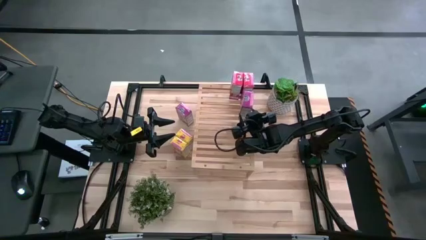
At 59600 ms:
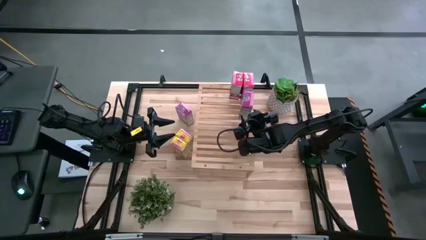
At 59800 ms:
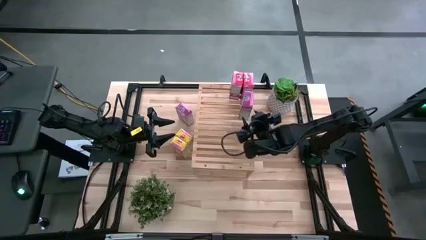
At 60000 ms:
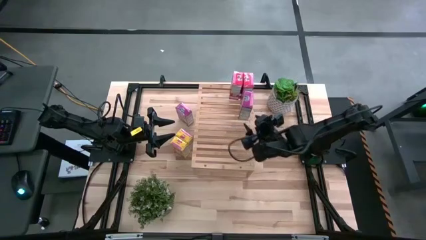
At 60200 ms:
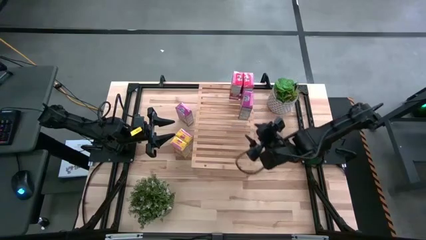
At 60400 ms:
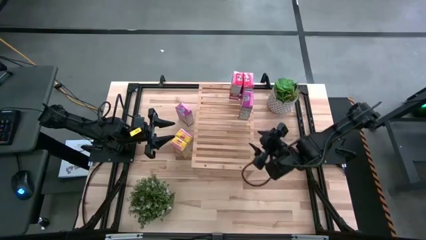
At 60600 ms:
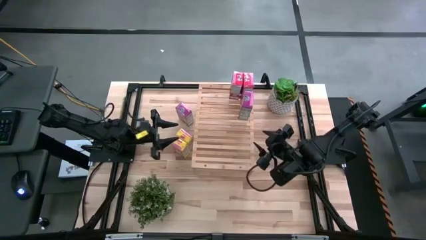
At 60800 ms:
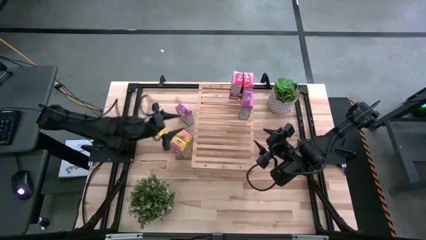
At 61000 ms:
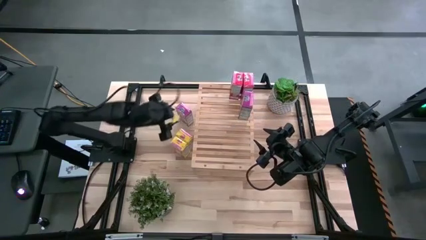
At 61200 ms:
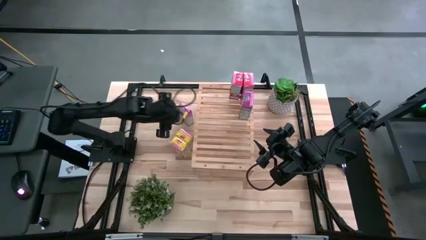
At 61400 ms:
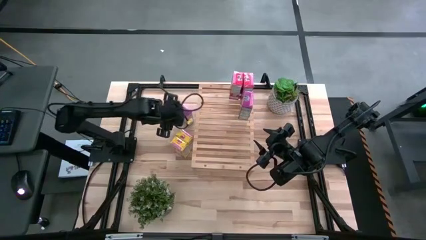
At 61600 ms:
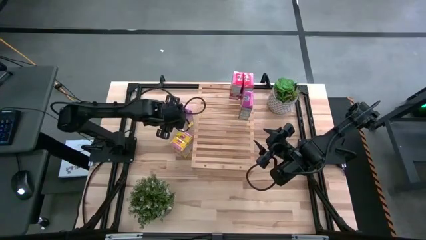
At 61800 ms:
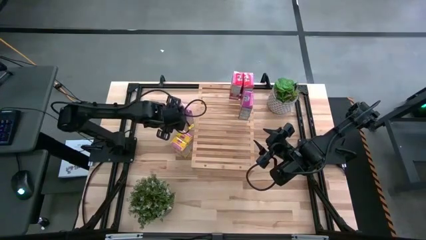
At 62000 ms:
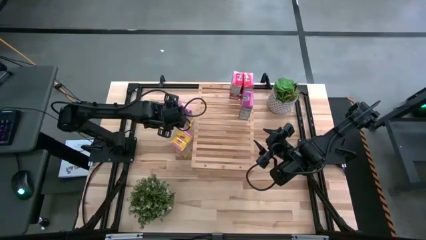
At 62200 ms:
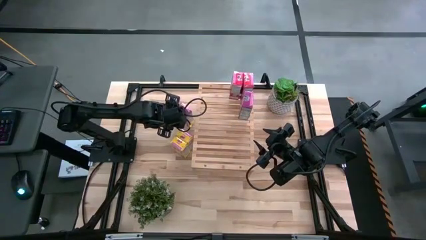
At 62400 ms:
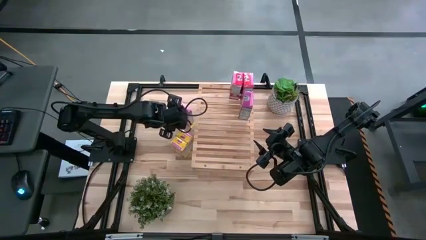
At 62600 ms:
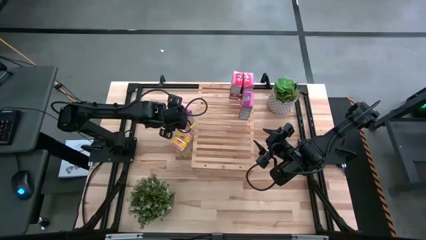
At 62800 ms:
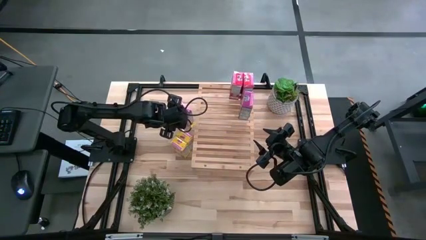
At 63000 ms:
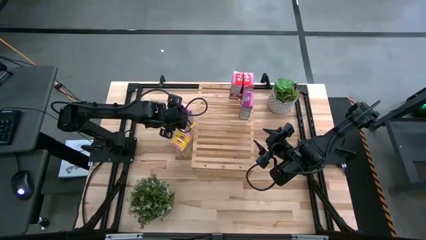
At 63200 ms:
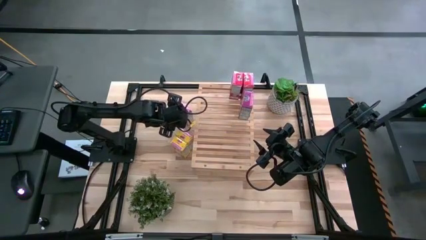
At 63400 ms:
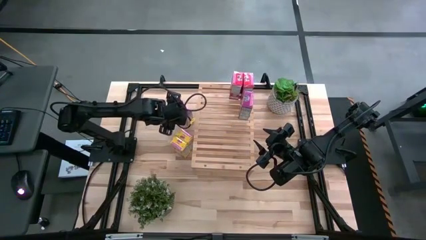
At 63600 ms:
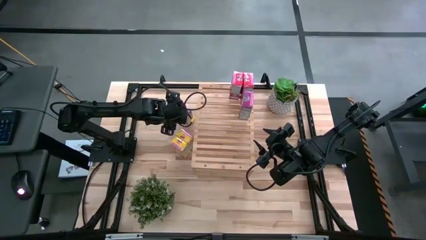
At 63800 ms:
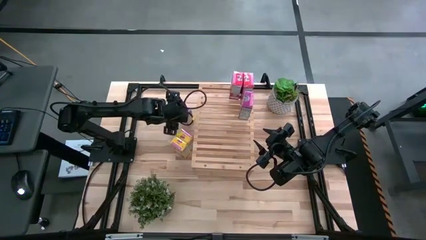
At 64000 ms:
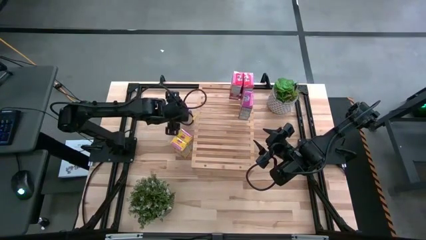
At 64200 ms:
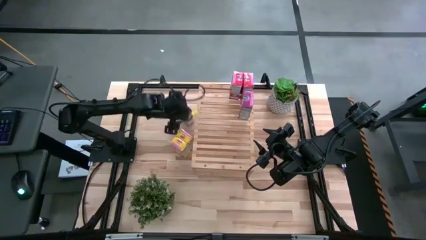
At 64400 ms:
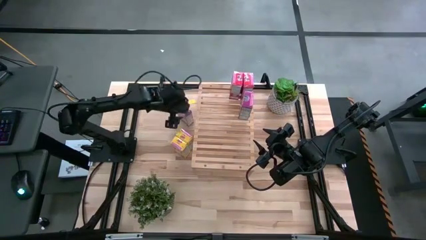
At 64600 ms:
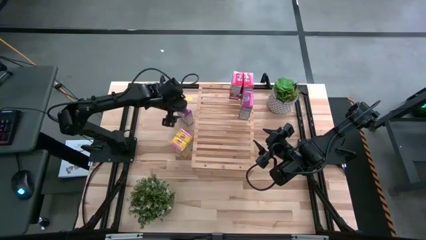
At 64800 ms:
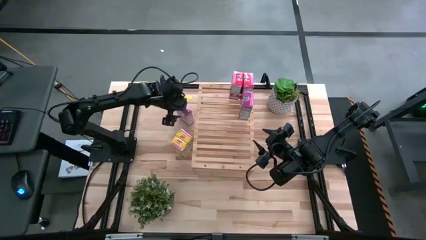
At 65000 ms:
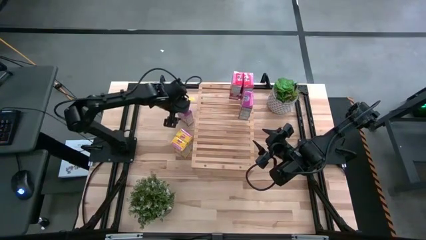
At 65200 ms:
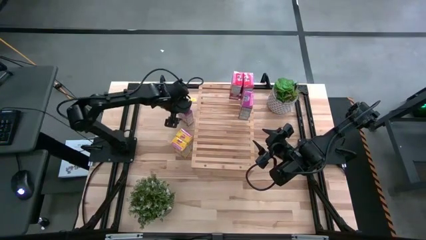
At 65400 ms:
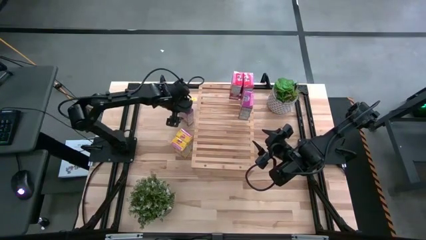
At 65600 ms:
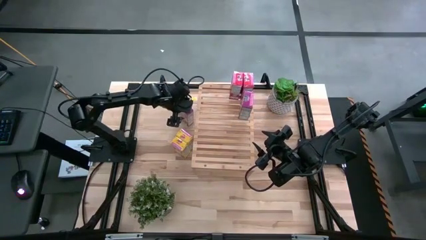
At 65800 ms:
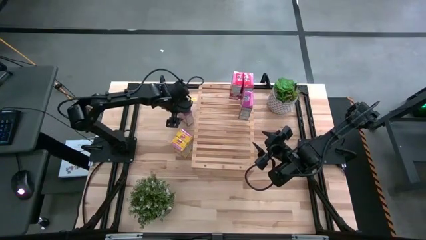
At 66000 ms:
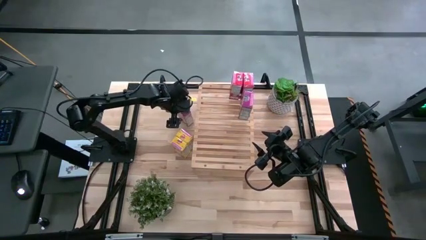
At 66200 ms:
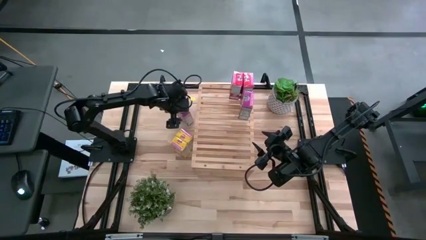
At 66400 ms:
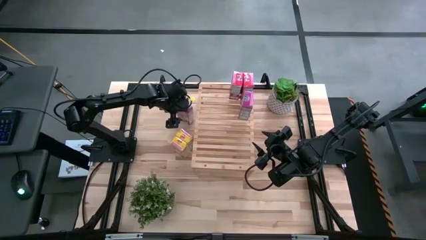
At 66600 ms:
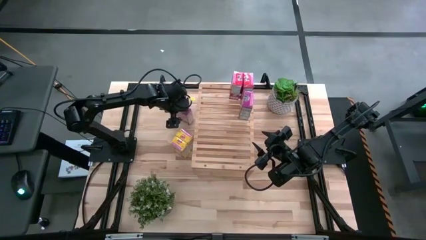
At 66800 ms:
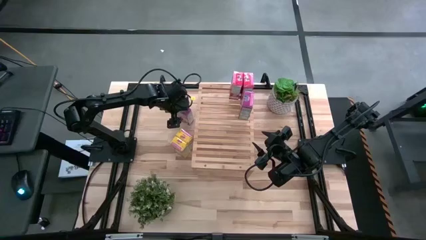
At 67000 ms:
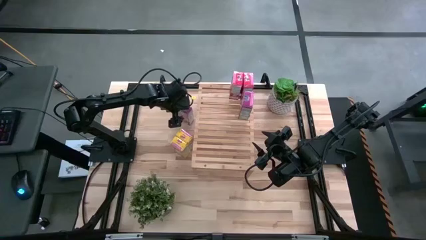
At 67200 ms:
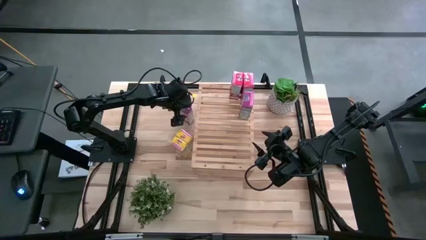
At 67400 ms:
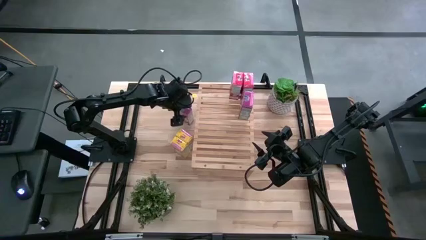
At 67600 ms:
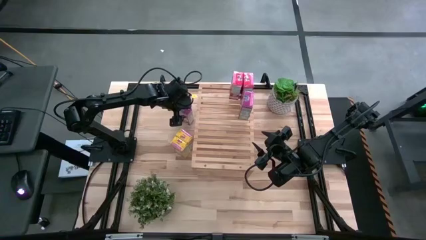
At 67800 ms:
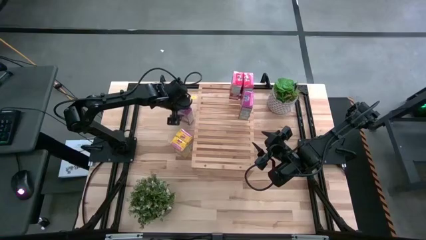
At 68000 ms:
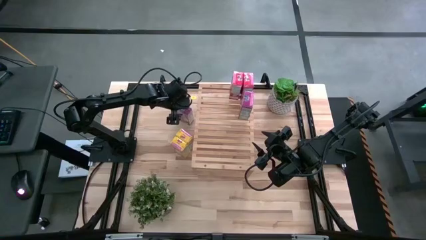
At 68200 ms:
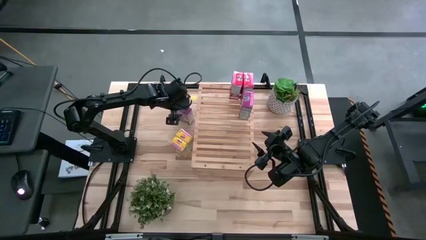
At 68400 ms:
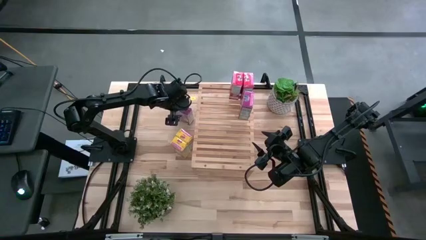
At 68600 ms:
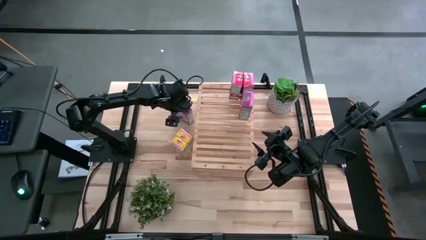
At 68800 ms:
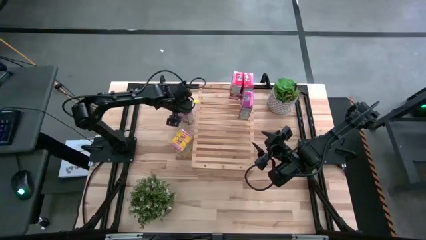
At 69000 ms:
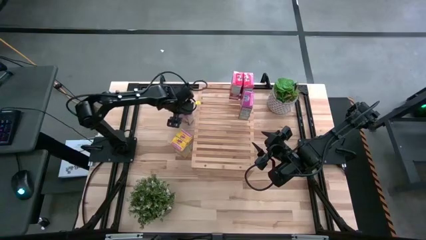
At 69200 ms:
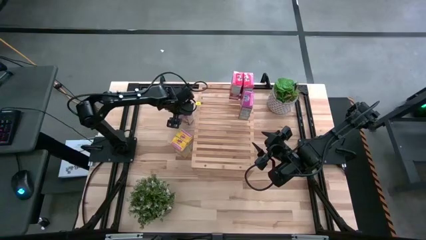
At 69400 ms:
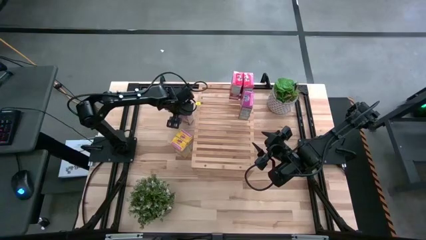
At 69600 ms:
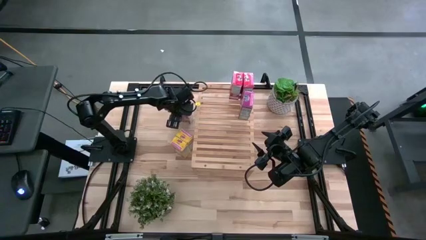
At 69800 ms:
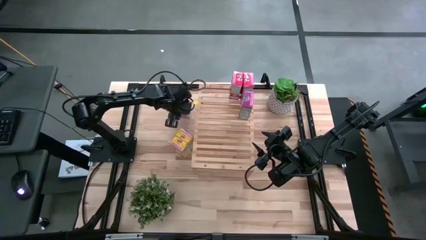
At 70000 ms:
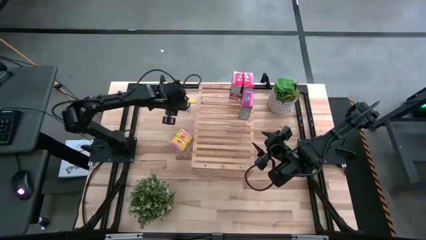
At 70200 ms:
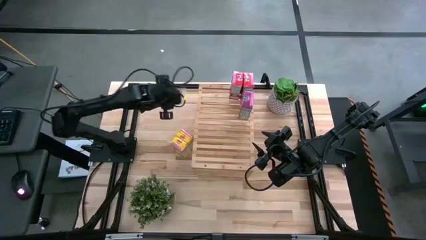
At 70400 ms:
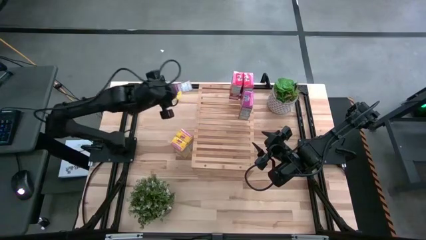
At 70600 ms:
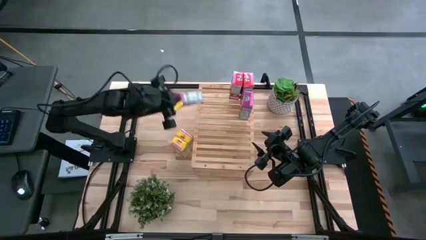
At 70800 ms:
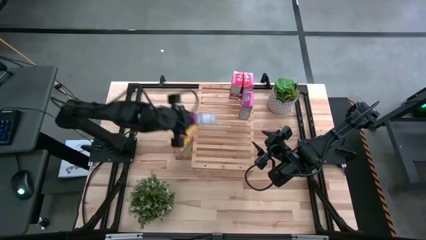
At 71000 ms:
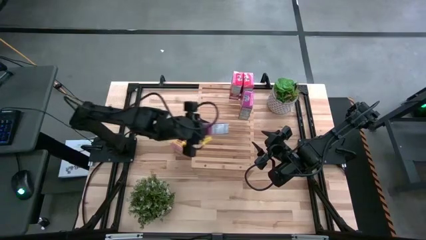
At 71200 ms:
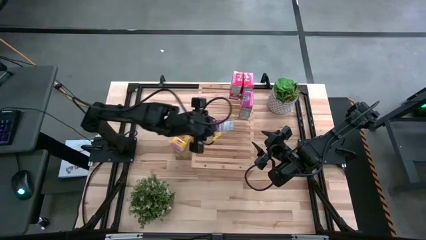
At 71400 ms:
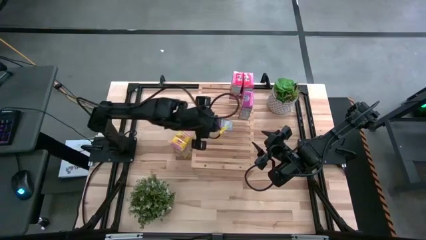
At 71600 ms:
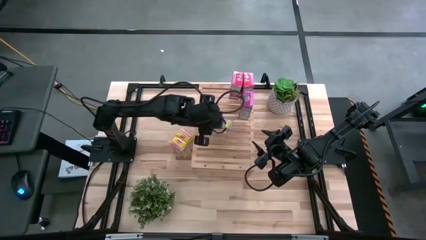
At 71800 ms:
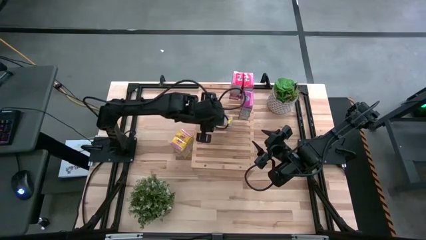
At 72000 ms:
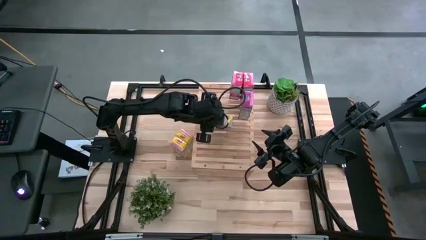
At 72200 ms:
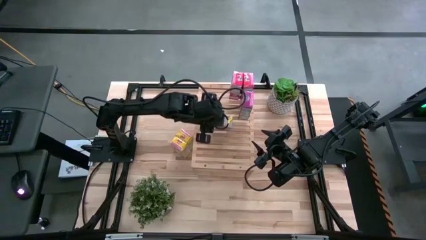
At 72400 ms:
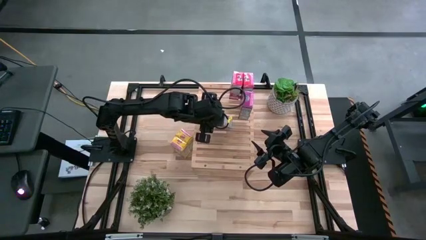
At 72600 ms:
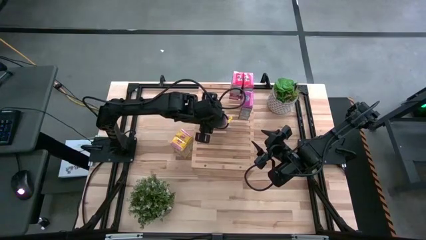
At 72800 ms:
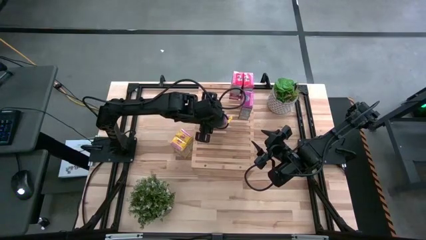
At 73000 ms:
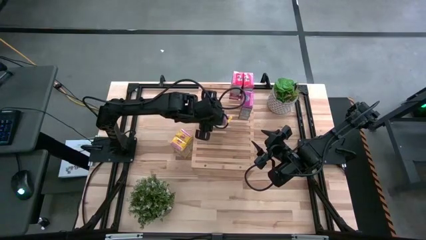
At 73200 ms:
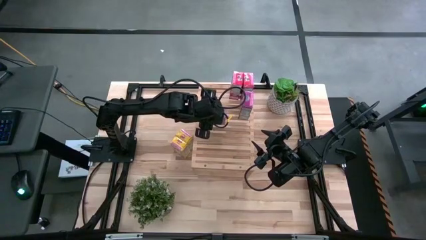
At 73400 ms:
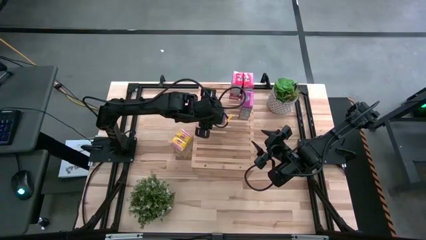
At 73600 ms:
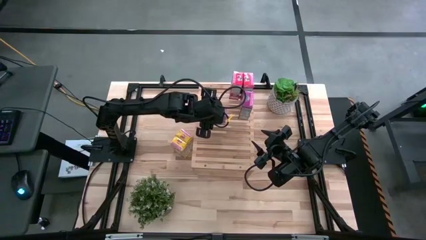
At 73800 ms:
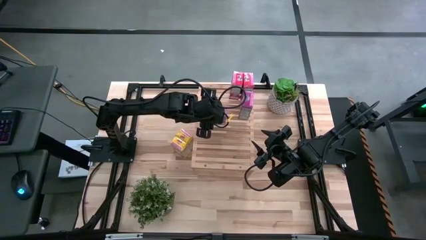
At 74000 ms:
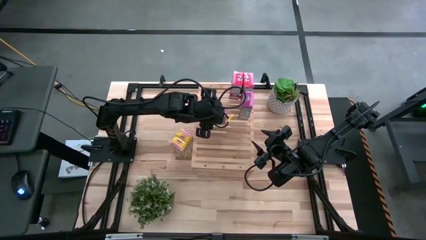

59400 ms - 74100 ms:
Task: Stack cereal on shelf
Put the purple cereal box on the shelf aligned with the other purple cereal box

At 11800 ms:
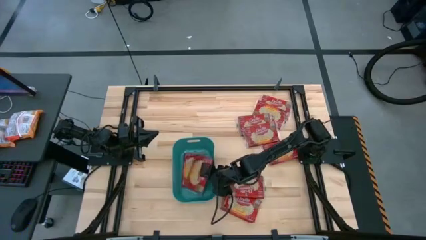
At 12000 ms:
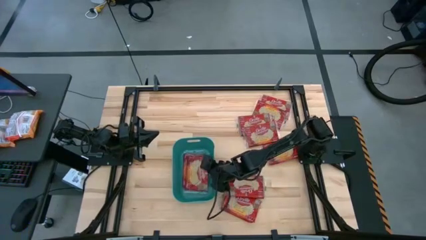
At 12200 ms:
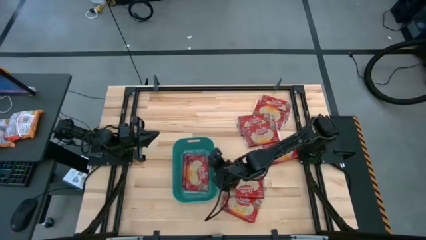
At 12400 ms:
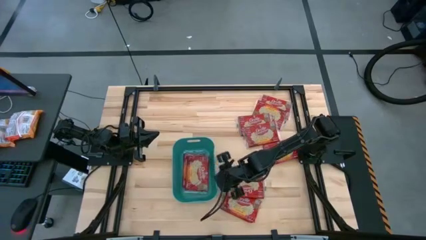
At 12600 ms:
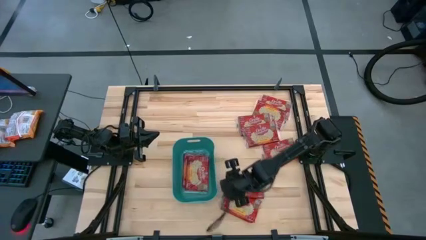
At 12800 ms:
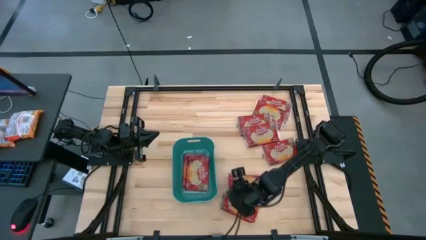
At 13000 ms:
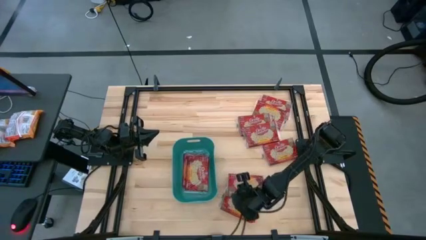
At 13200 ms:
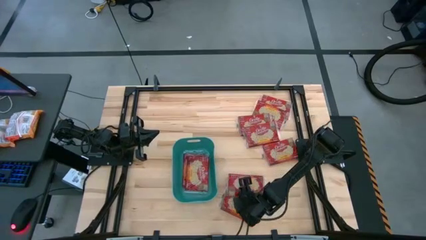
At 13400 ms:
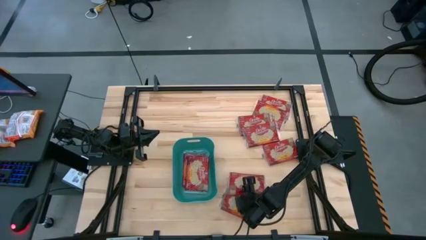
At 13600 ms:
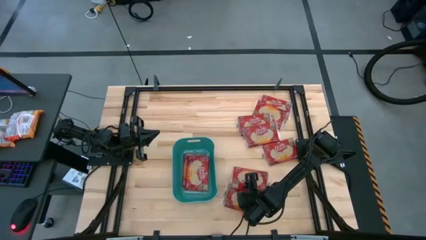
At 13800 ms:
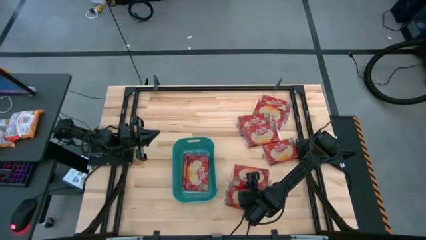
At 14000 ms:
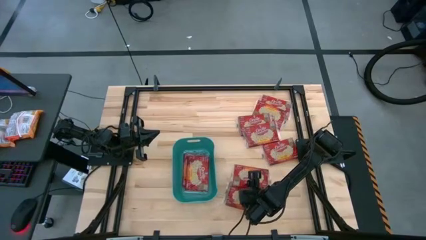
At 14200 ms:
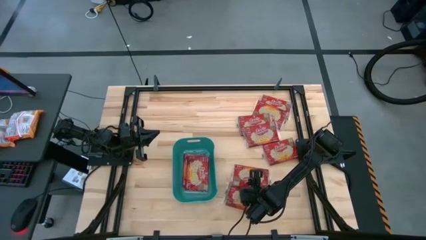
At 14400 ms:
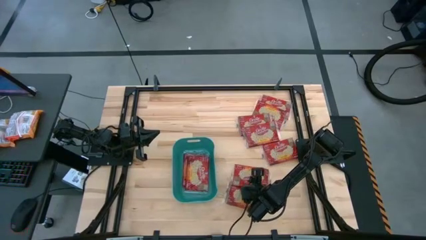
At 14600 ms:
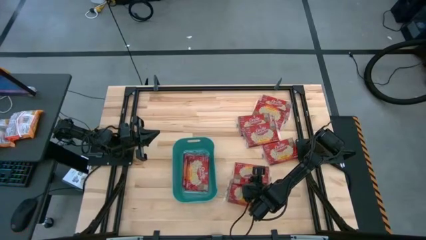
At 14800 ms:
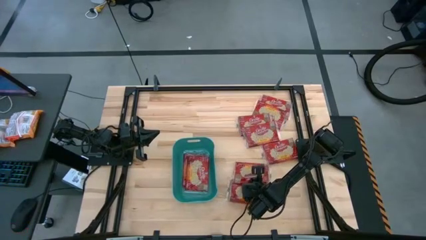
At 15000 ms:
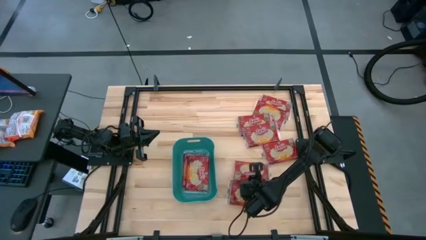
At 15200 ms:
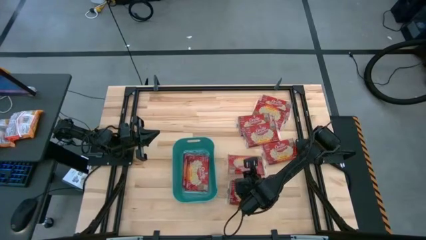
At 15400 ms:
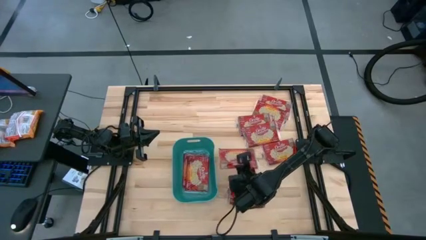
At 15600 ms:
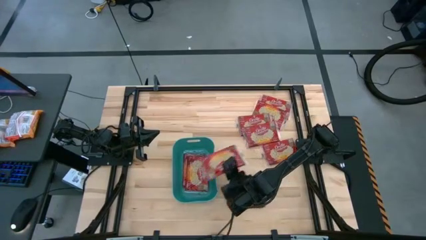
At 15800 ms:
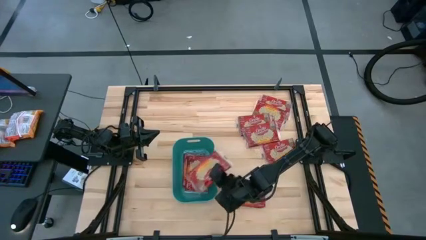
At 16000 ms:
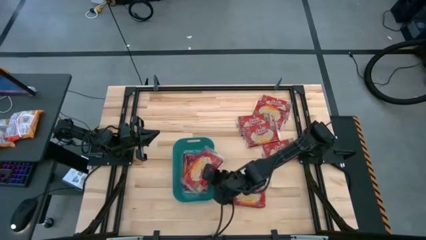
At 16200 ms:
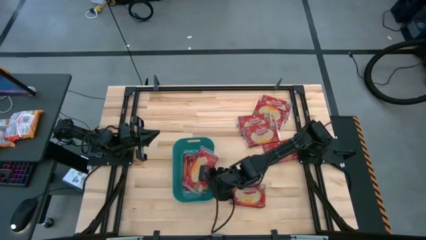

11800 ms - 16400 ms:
Task: Sort popcorn bags into baskets
Put the red popcorn bag into the green bin
